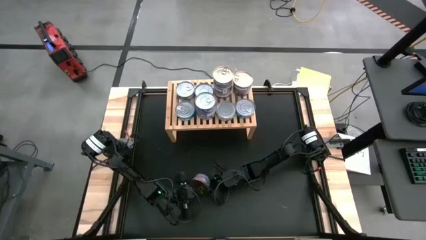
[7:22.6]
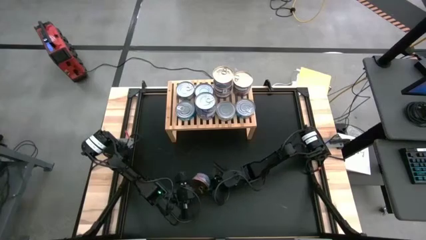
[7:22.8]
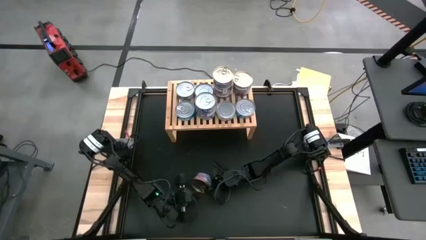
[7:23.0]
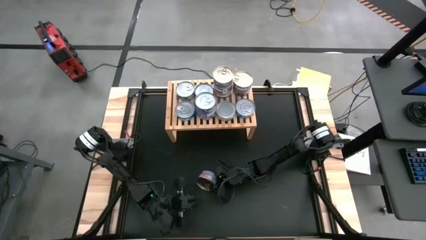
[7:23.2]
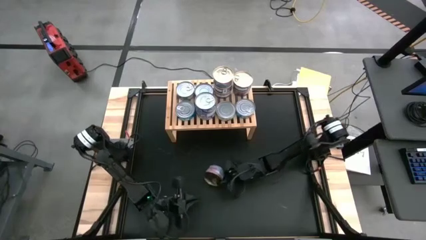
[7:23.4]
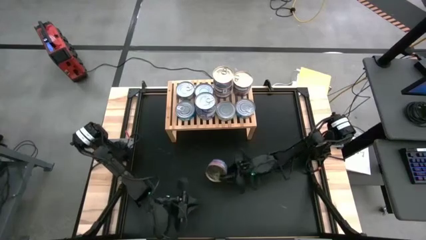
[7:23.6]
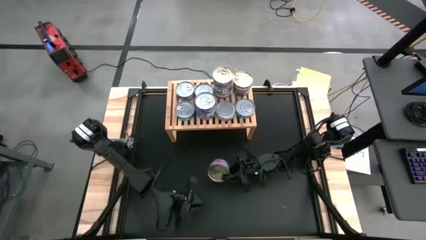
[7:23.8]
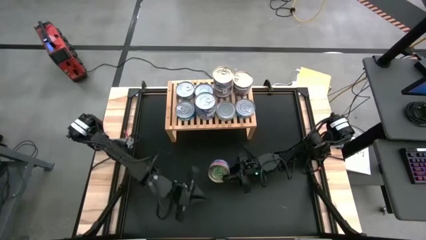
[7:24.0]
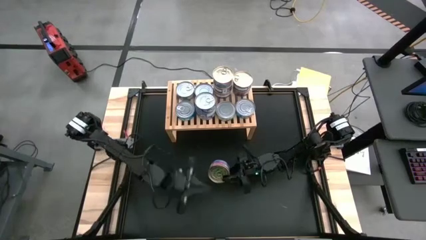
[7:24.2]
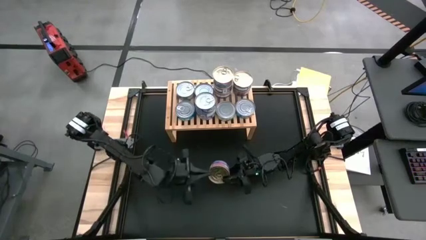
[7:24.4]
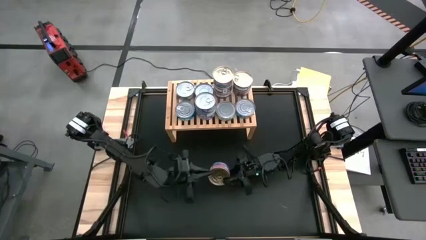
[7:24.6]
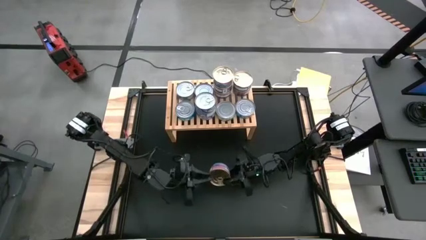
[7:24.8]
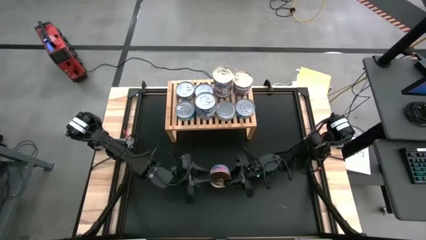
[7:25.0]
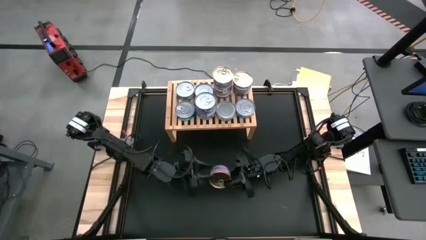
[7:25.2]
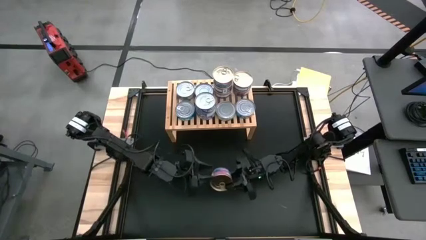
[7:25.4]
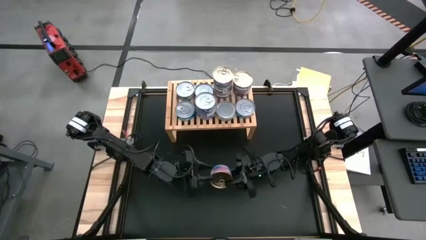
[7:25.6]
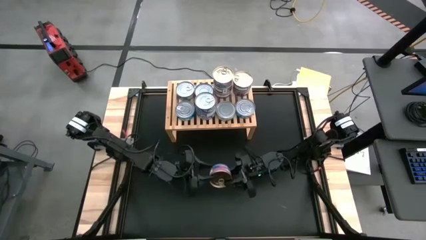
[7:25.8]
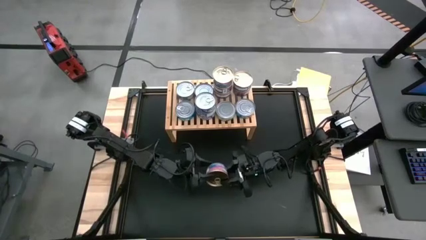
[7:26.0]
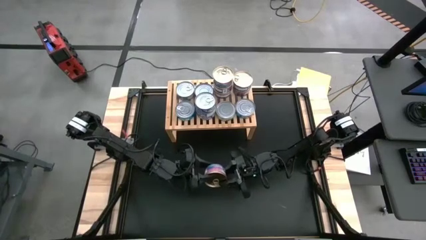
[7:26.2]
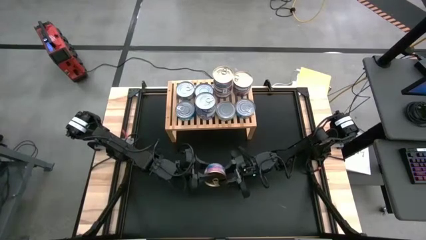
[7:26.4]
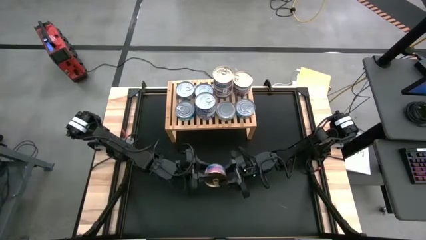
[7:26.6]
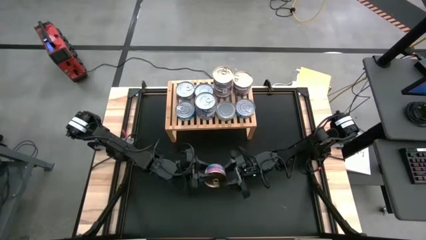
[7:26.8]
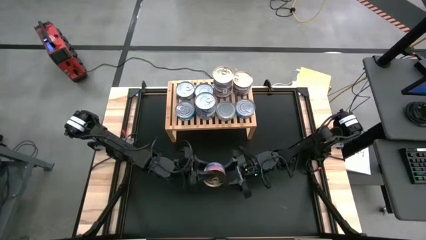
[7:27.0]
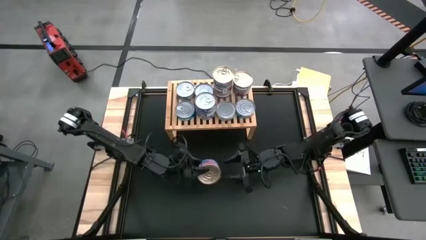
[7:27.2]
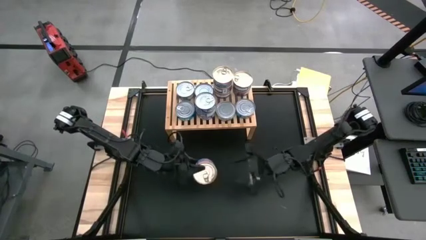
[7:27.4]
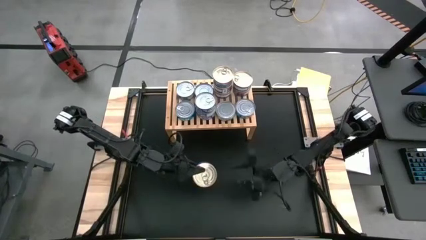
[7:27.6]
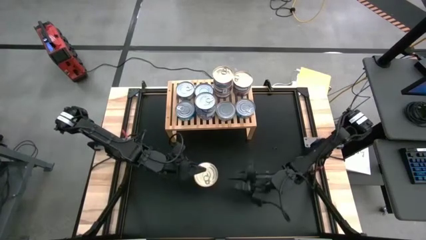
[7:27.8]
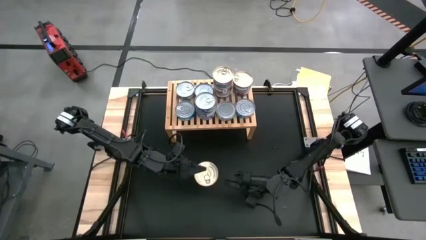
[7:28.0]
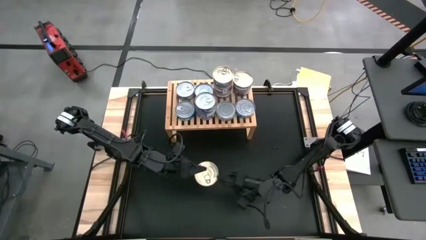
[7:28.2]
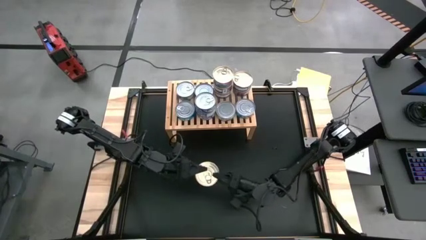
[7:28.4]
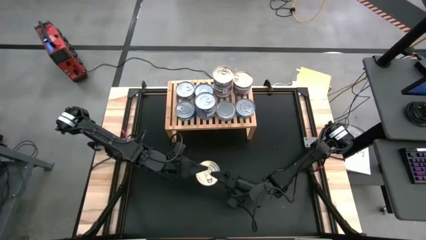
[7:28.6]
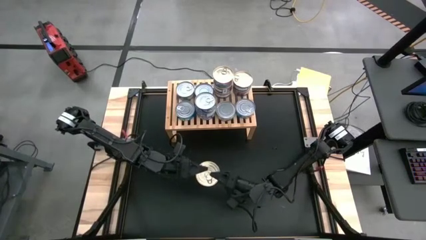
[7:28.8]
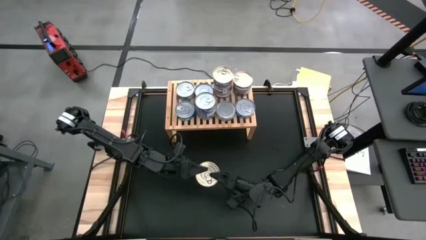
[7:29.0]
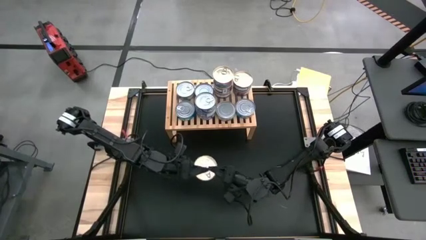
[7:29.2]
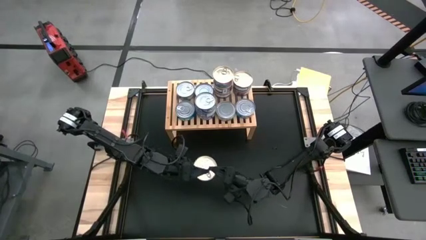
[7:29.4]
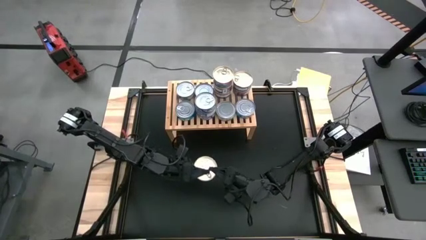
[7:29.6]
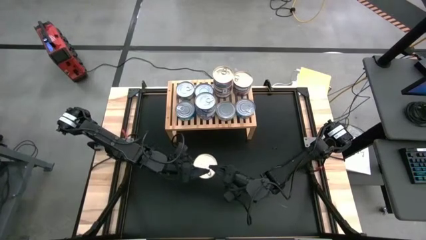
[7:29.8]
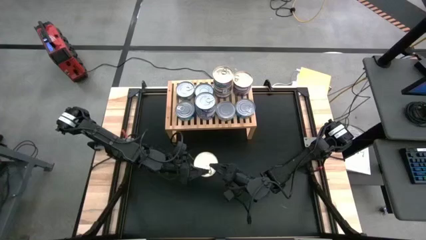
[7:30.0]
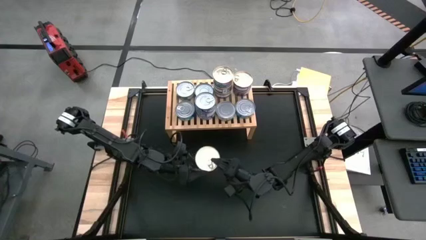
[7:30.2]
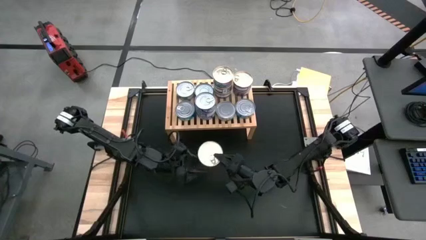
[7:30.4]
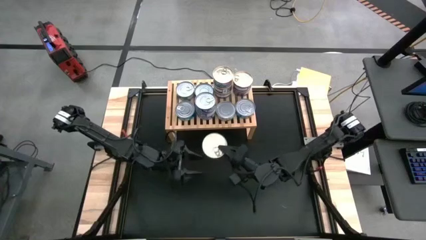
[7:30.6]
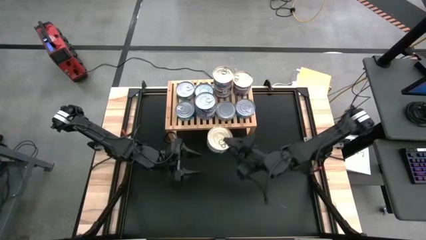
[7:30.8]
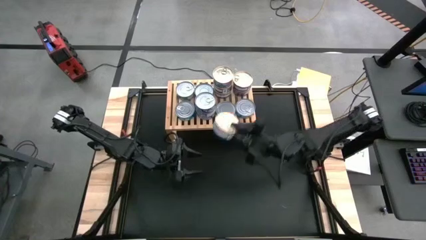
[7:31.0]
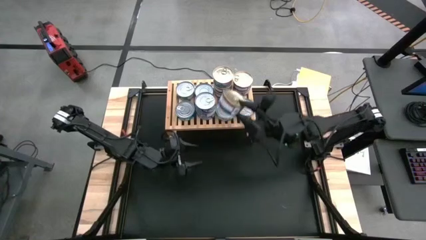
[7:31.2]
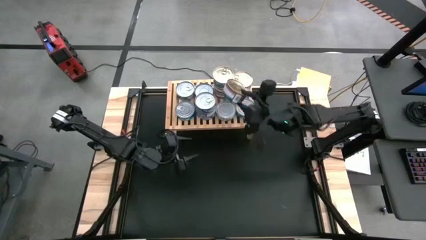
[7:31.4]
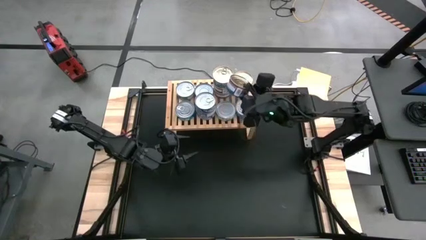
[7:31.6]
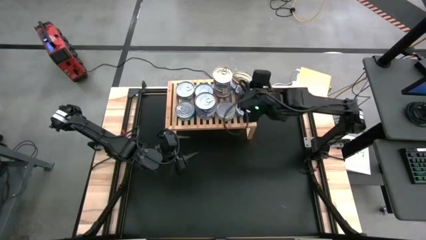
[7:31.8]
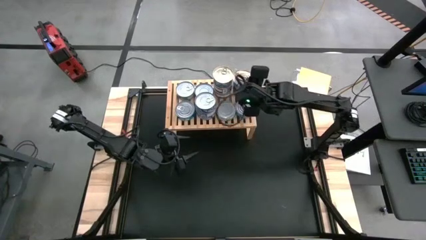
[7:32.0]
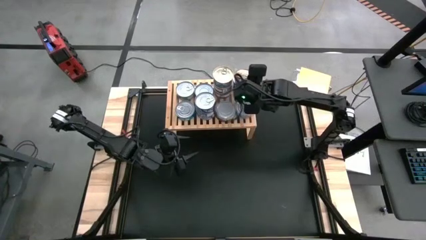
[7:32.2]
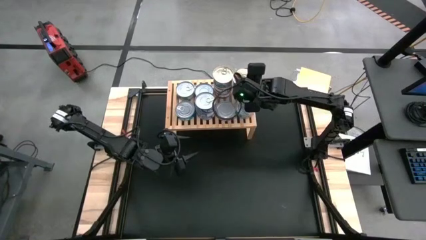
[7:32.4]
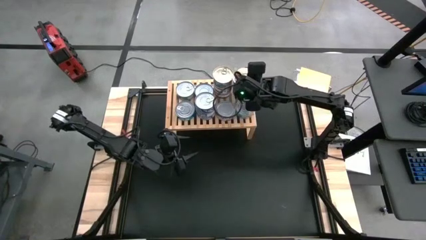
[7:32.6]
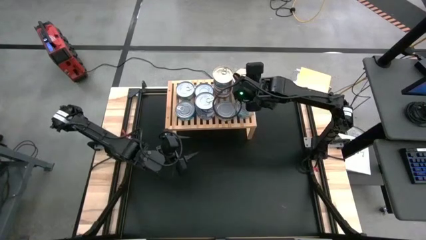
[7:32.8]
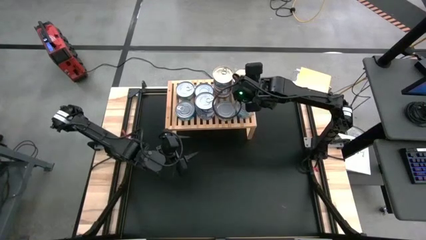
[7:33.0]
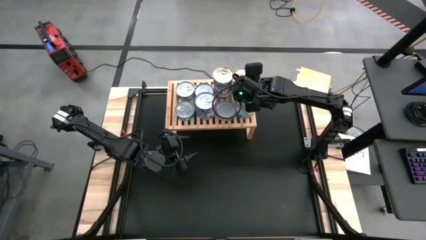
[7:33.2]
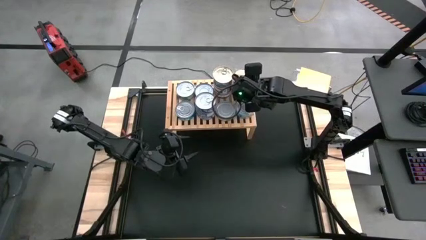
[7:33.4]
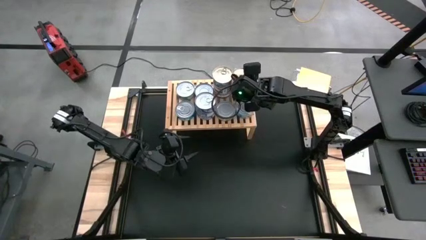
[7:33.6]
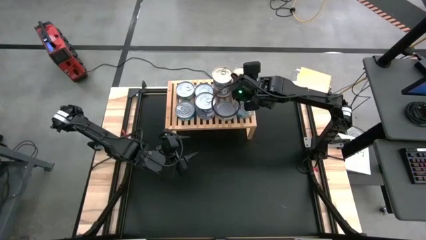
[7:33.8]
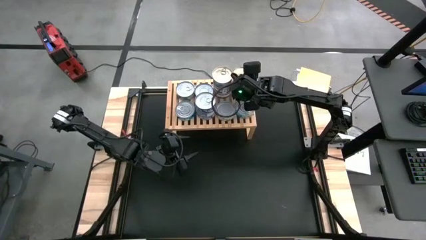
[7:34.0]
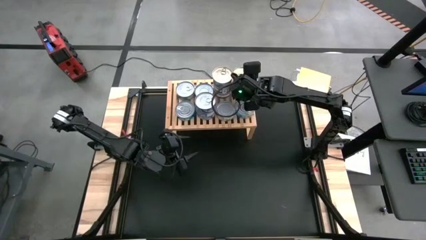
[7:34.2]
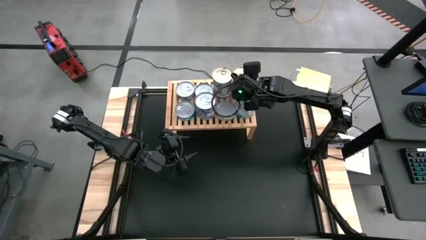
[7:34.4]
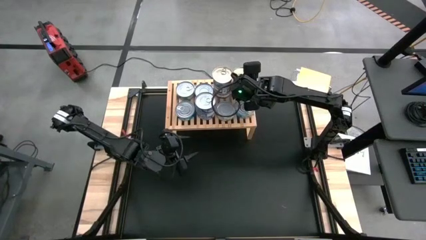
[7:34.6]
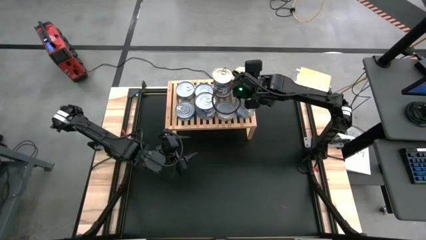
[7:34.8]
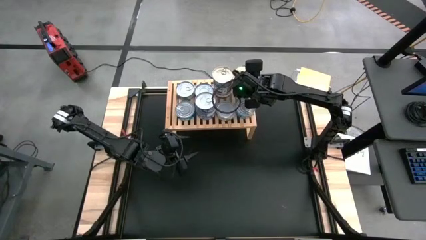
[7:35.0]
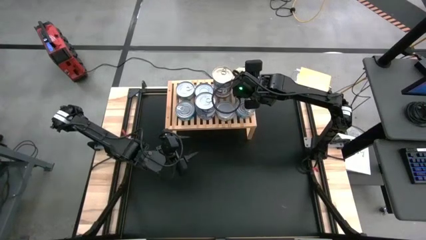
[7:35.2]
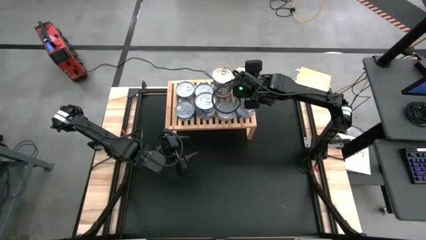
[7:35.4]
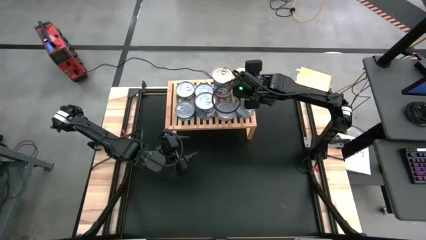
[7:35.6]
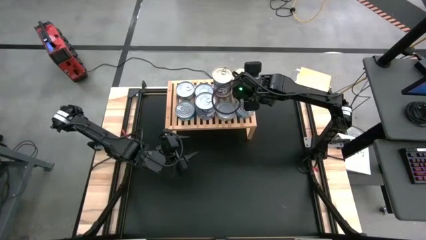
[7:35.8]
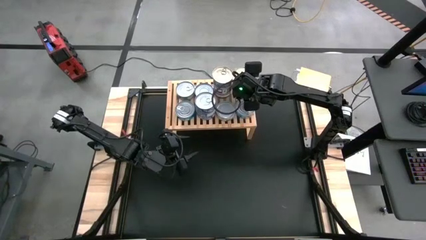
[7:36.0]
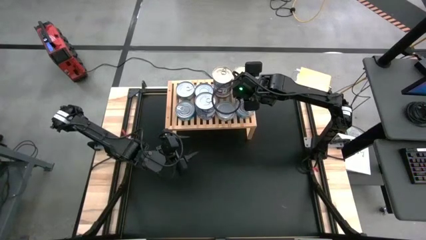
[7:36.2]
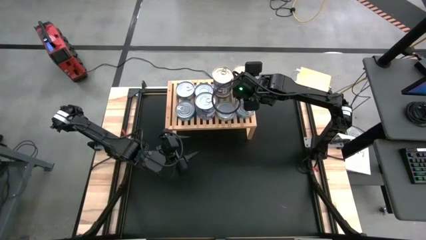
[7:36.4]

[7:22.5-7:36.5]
Task: Stack canned seafood by type on shelf
Stack the blue and pink tuna can on top of the blue and pink tuna can

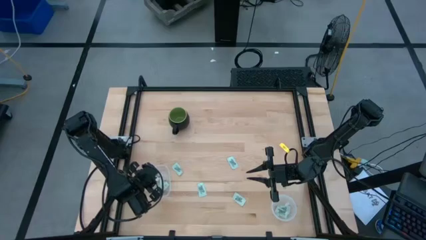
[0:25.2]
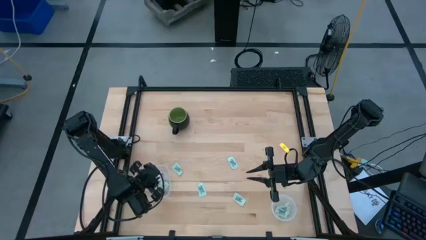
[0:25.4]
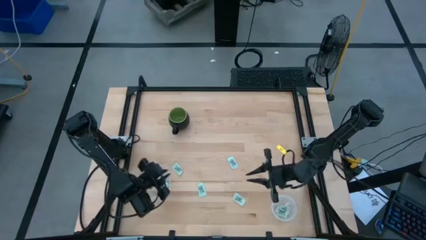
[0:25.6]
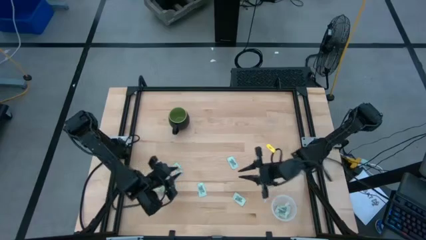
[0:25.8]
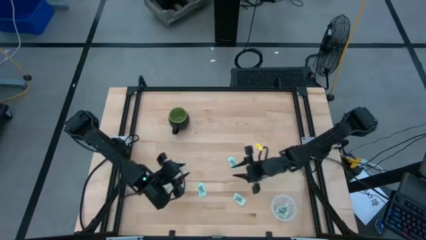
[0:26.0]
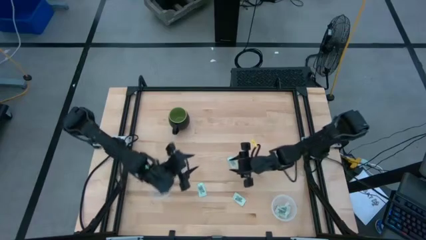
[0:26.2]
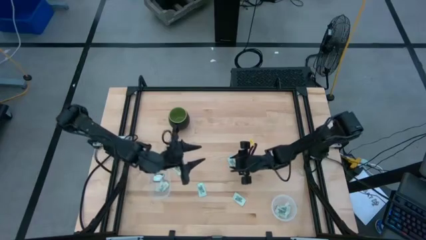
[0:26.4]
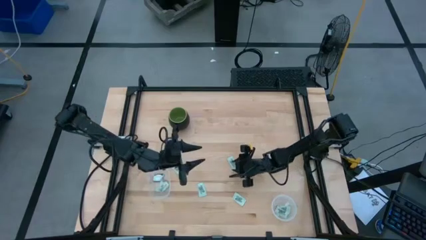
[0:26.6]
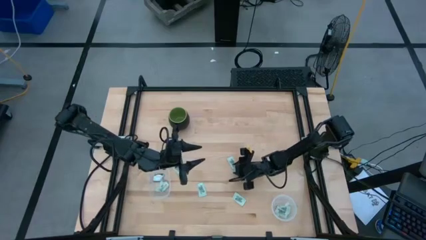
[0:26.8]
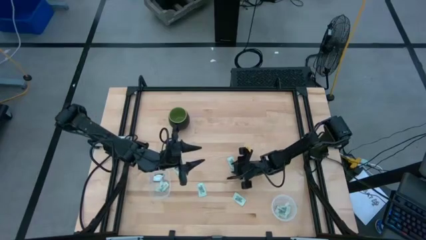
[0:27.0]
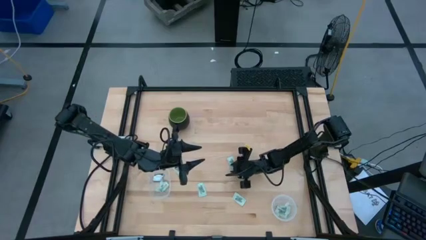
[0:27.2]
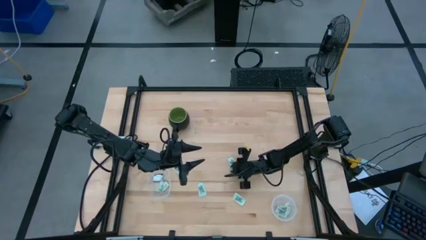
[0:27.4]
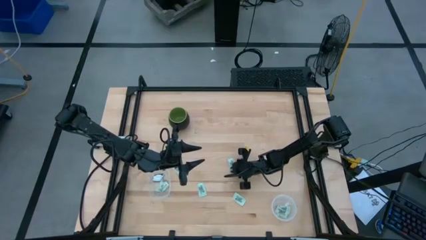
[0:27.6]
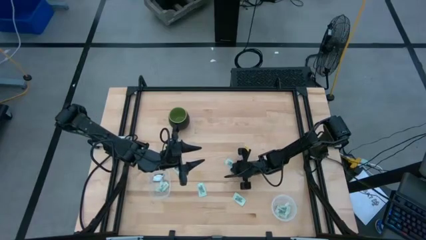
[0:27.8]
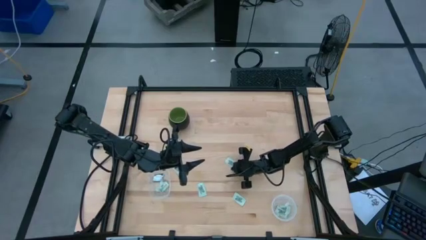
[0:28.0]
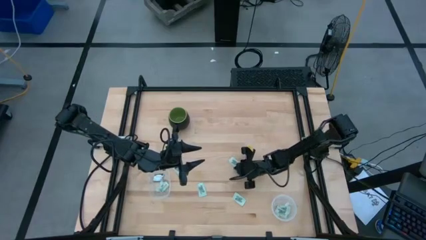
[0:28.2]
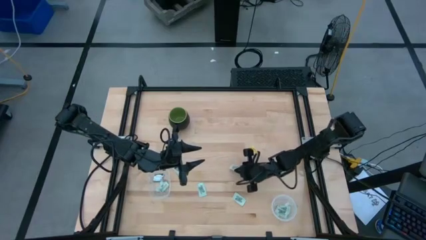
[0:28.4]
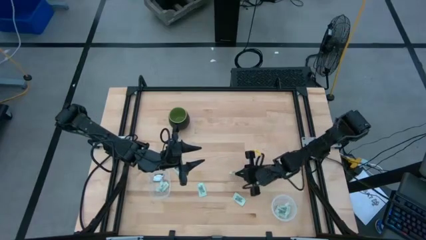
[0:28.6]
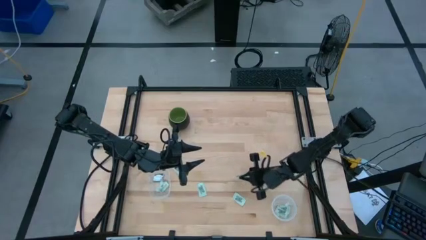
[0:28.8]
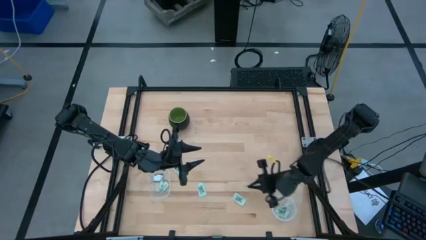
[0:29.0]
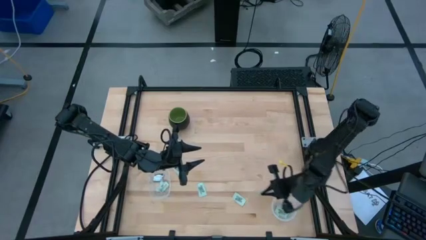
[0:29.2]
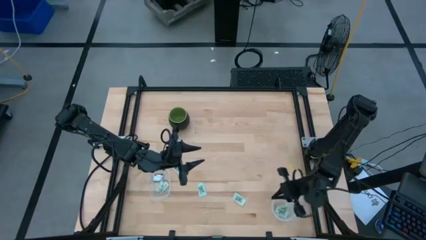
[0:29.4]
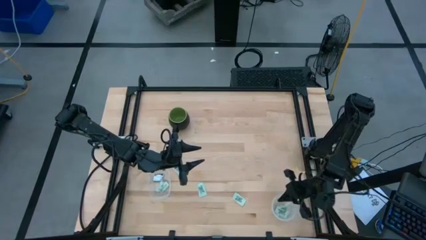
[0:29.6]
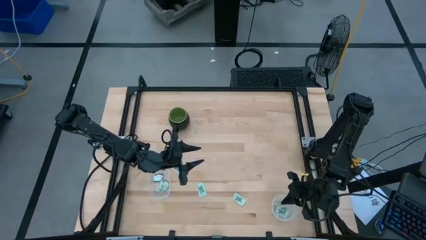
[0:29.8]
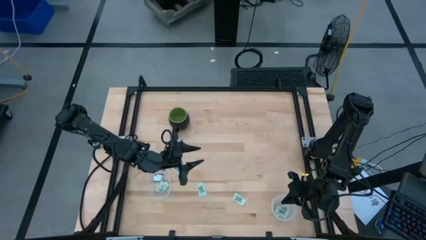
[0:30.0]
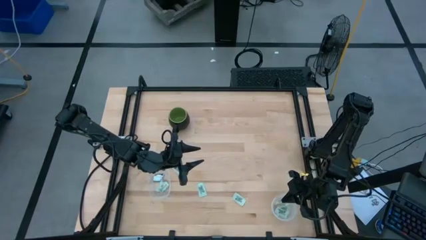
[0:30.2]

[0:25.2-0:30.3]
Task: Pick and place Stevia / Truvia into bins
Put the Stevia packet into the top left transparent container
